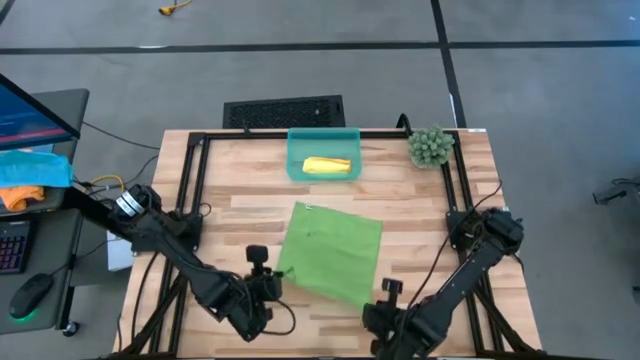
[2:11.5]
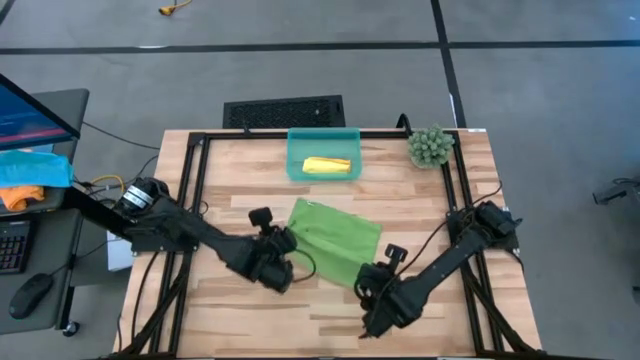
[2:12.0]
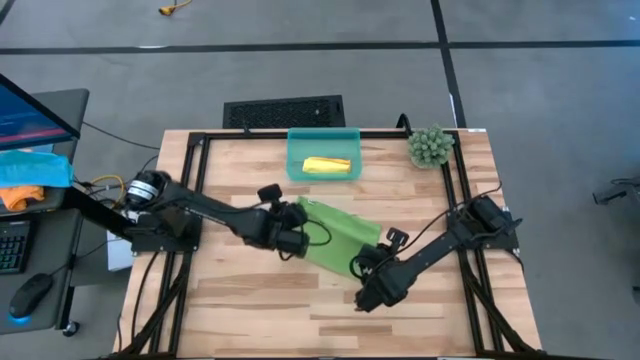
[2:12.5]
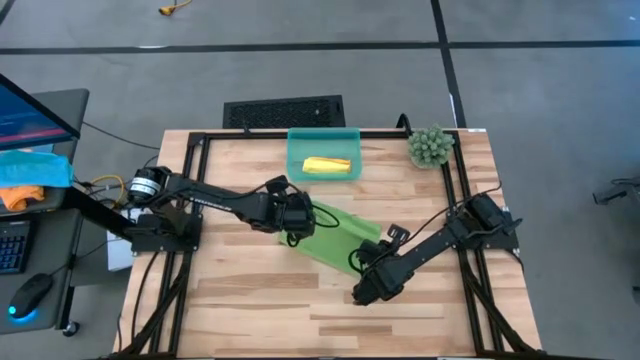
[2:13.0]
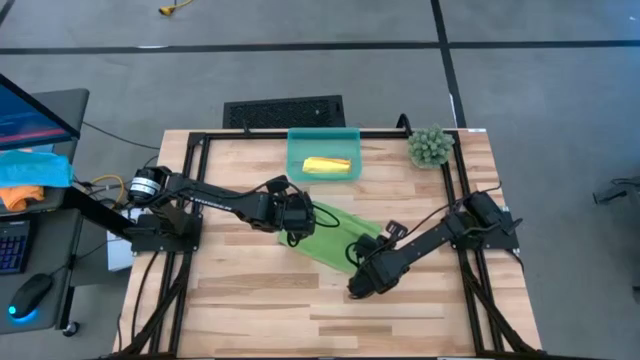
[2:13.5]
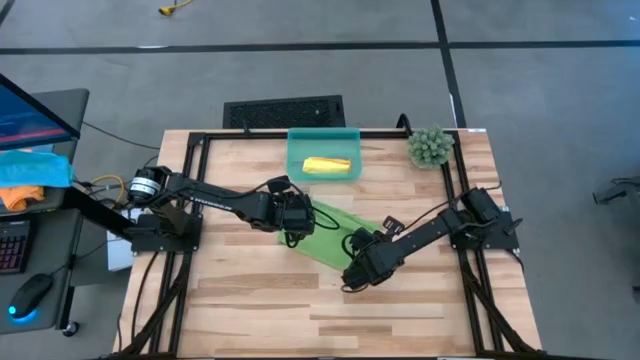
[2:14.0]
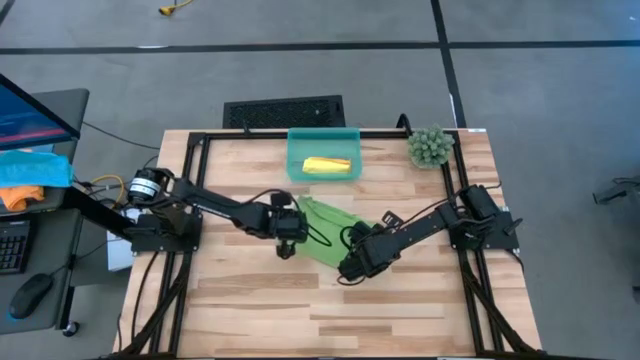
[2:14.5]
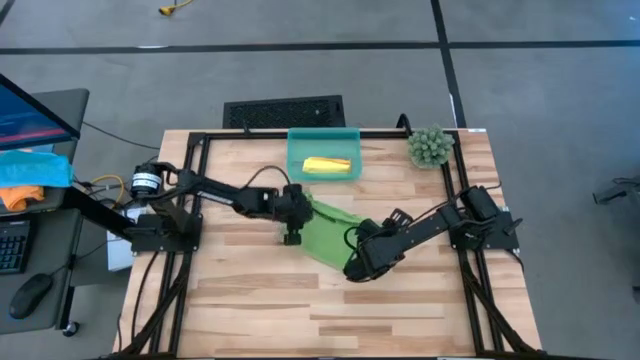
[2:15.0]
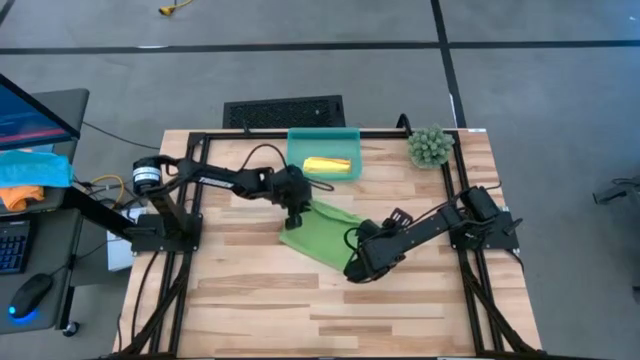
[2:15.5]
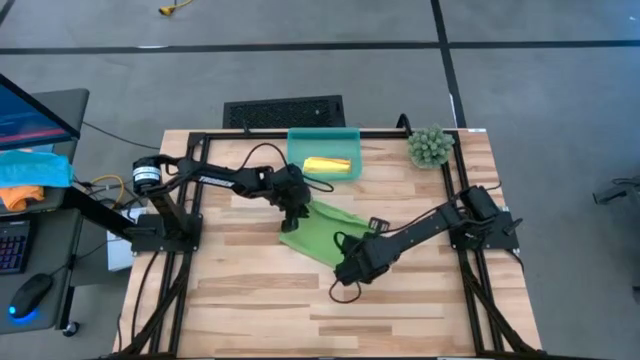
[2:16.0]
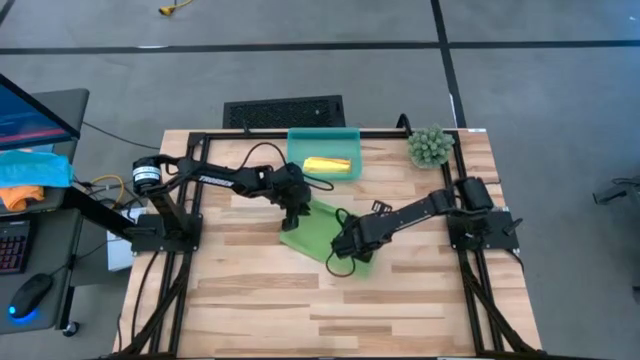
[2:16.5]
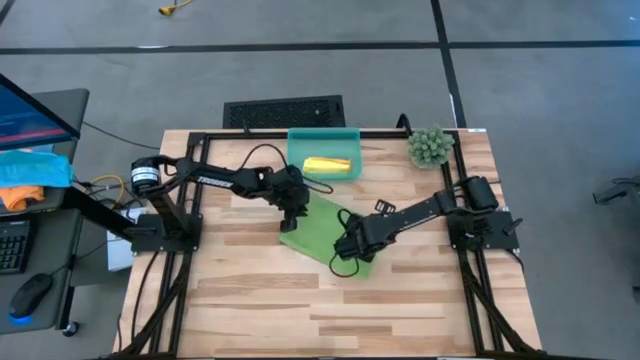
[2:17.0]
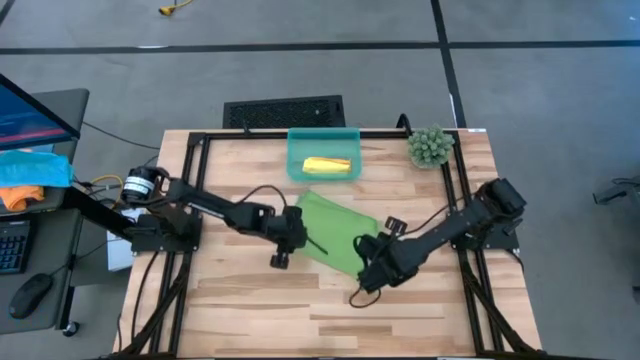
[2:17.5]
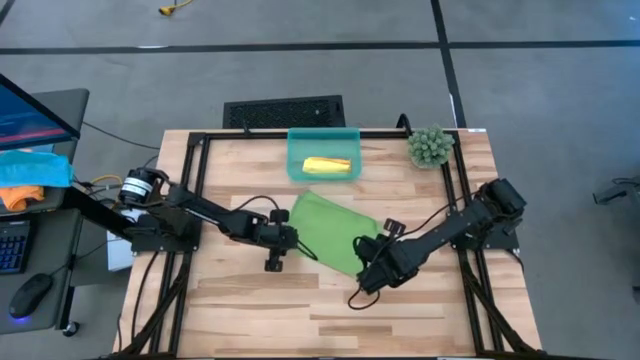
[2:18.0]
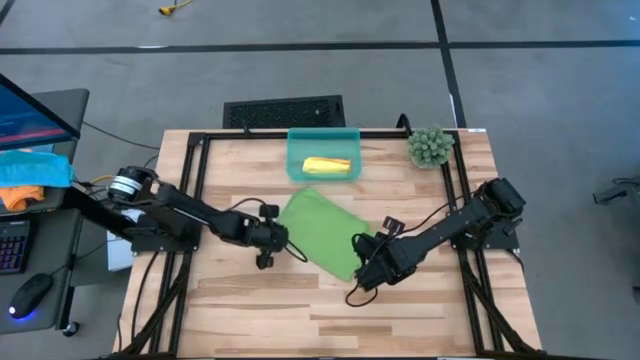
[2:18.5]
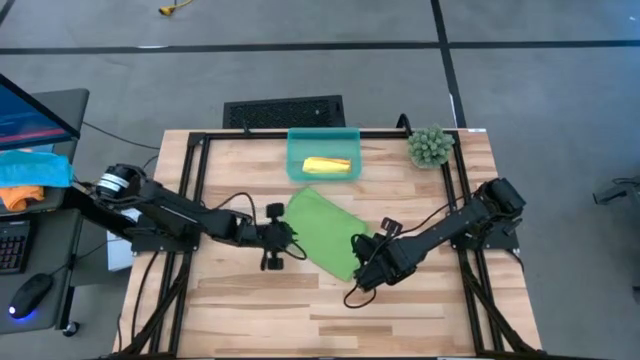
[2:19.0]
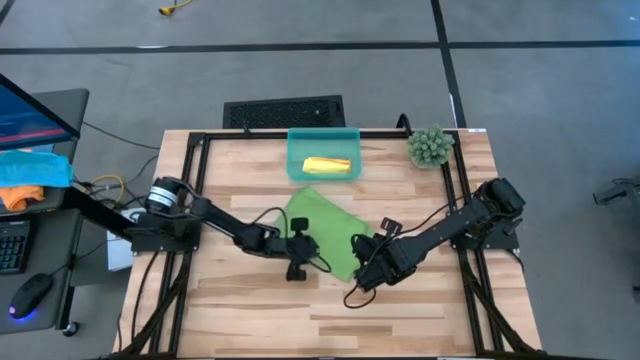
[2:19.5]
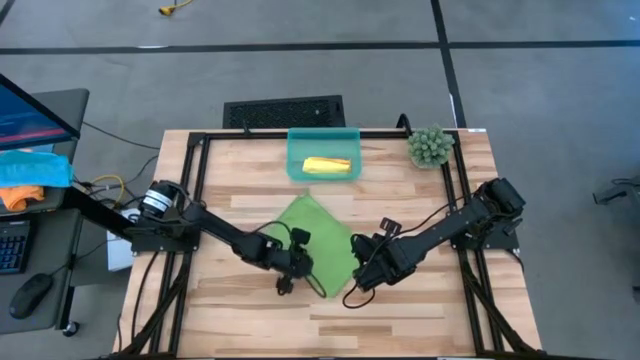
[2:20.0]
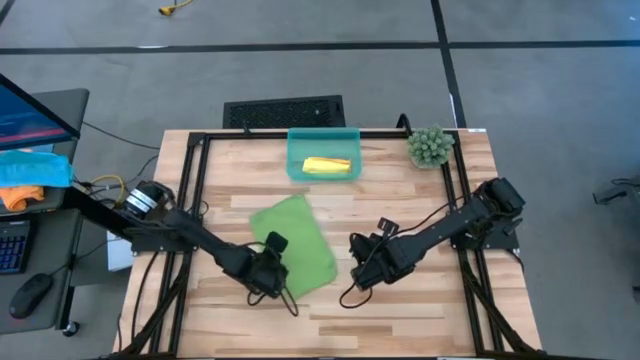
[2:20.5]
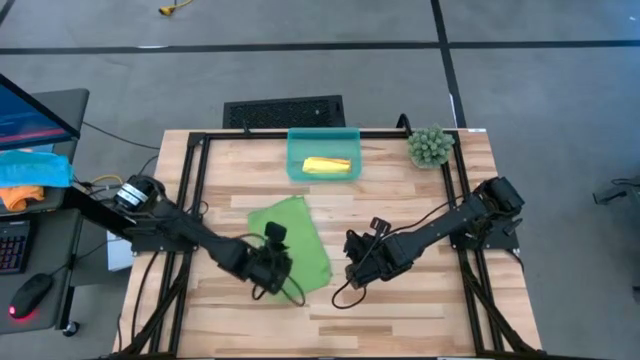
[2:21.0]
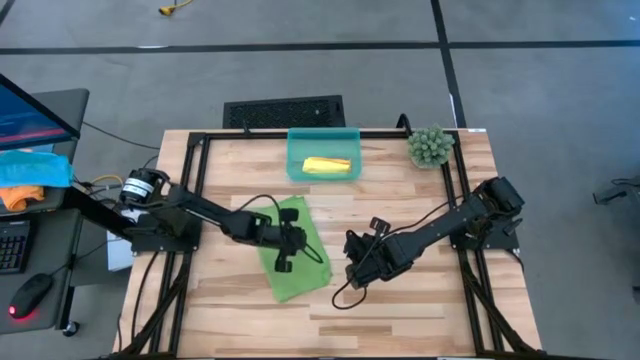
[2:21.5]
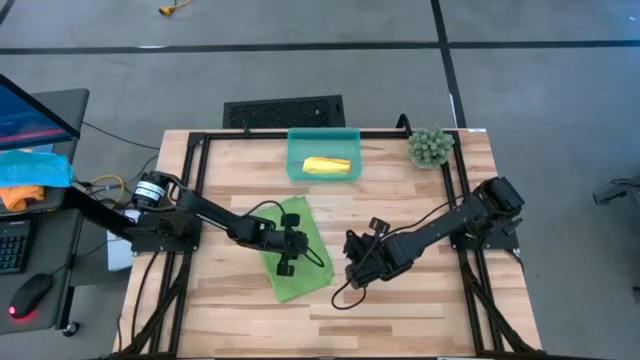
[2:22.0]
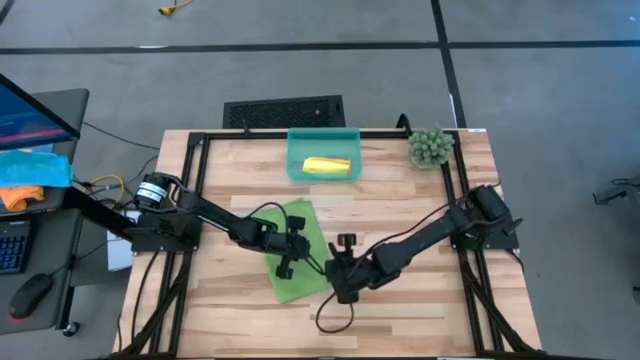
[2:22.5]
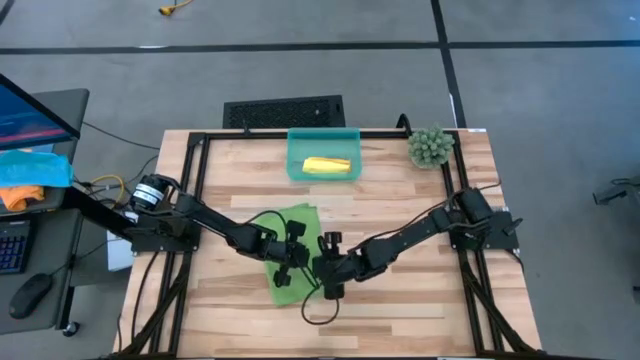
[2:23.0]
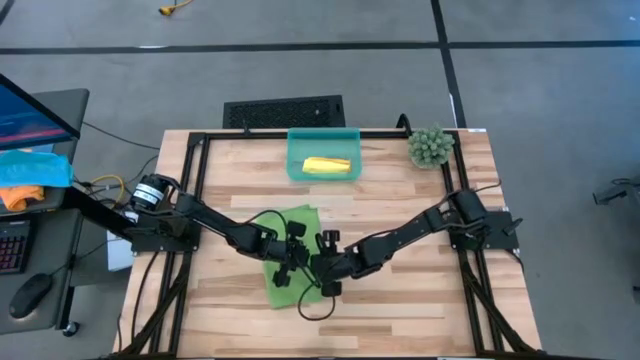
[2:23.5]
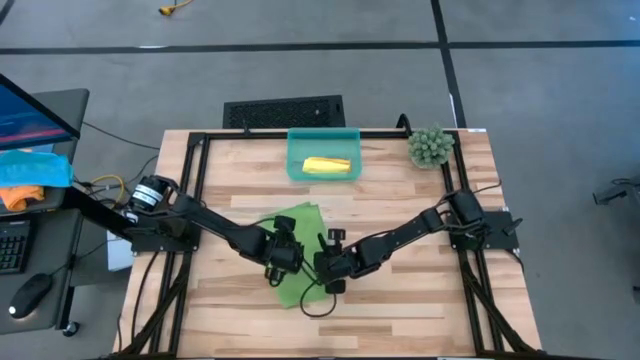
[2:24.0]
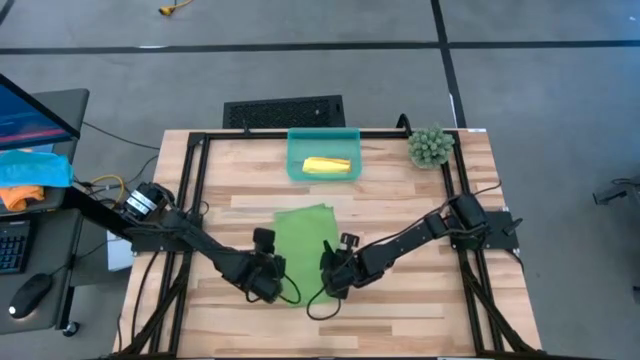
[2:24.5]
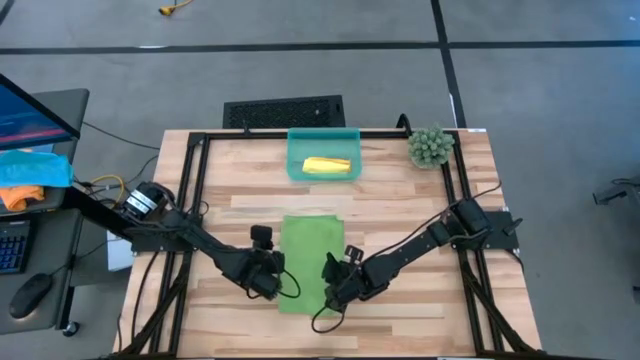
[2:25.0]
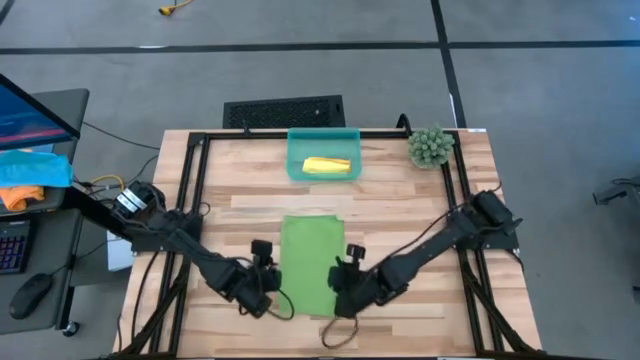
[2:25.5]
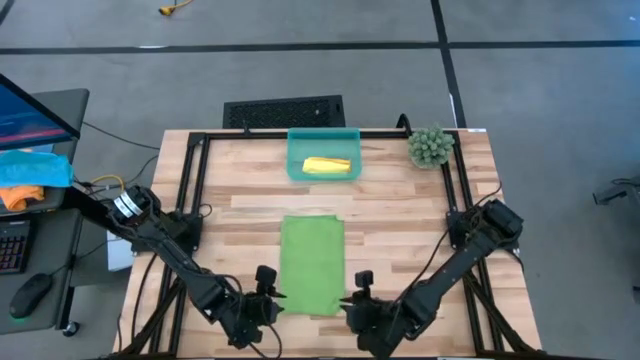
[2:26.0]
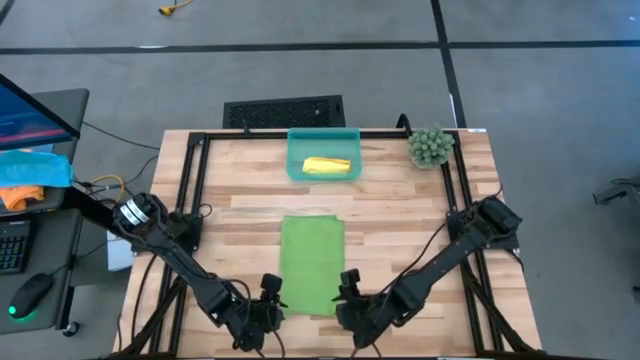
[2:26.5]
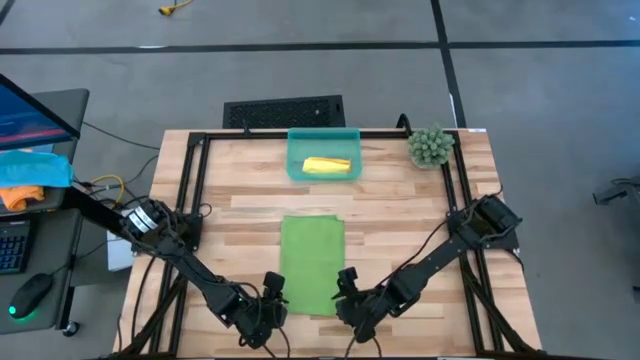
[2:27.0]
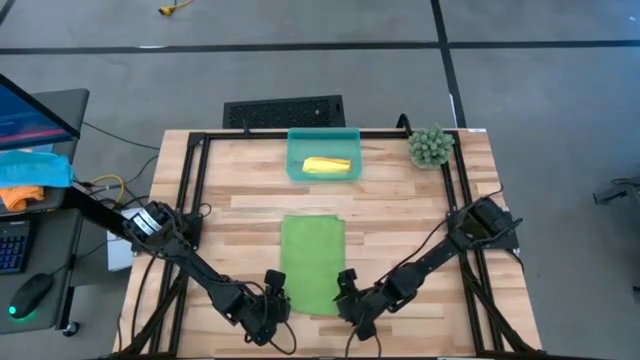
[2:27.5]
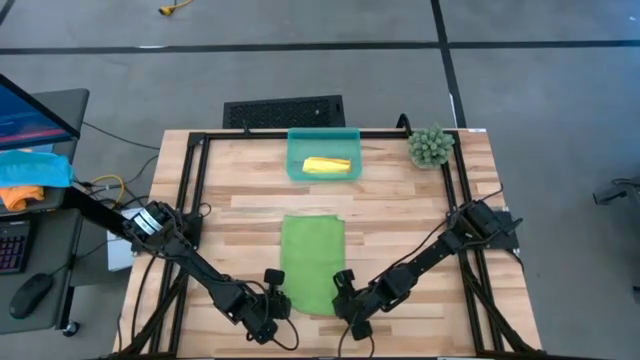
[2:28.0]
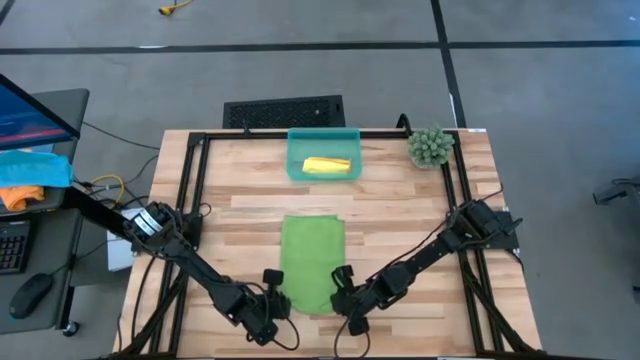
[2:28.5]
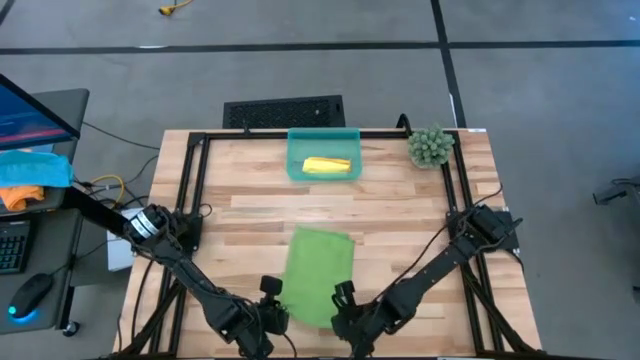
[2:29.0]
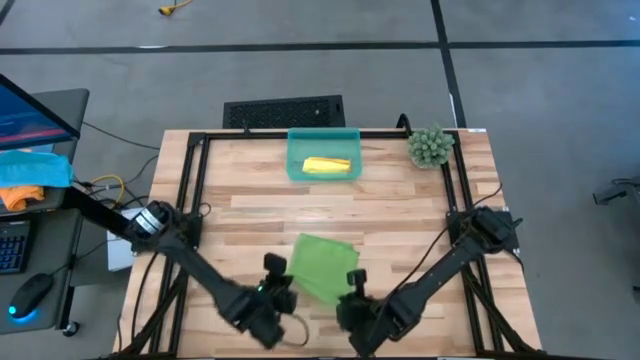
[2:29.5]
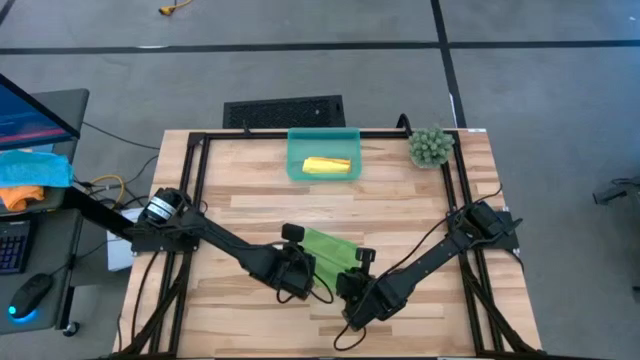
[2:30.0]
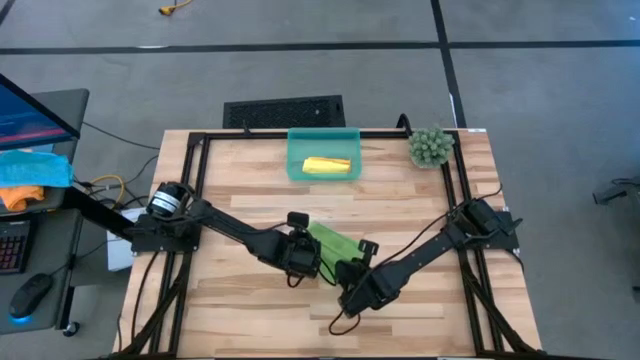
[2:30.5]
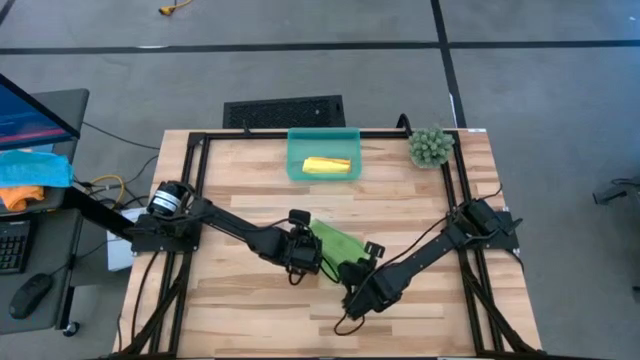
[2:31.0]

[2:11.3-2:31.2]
Task: Roll microfiber towels into tight, uniform cylinder then place into a basket
Fold the green microfiber towel

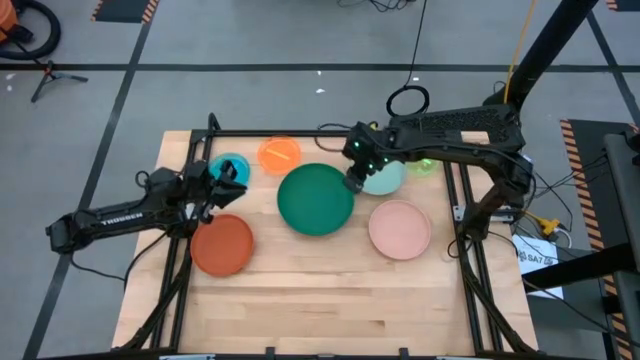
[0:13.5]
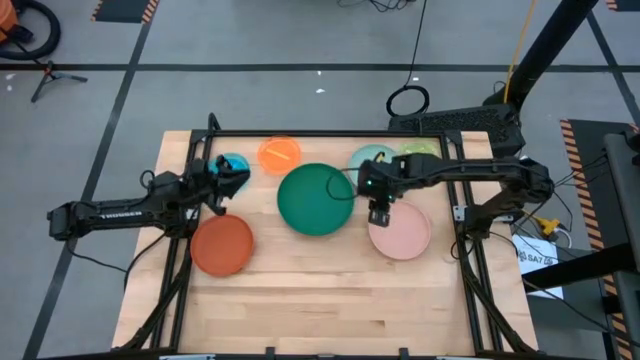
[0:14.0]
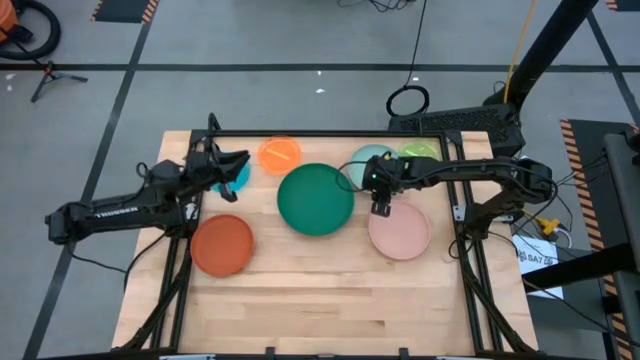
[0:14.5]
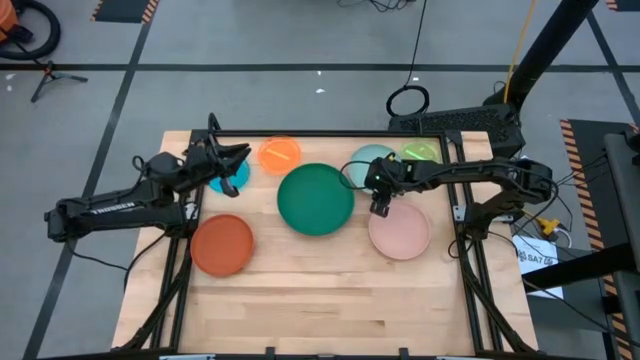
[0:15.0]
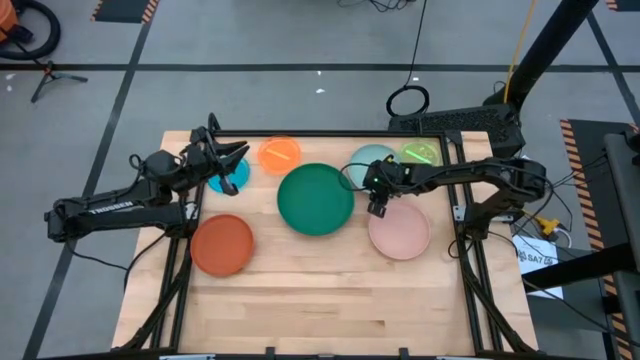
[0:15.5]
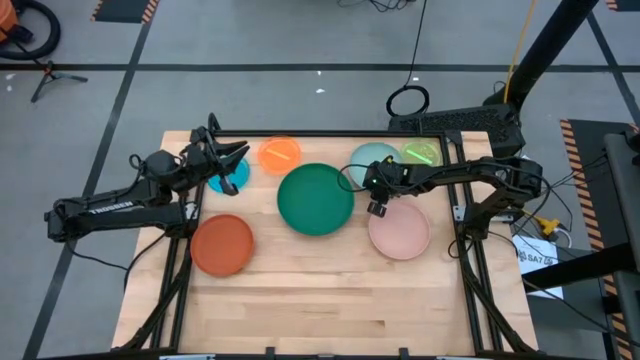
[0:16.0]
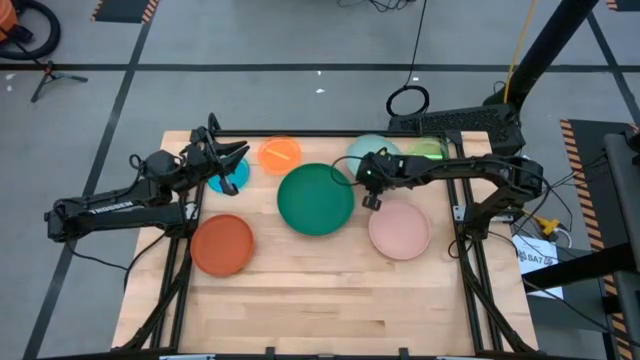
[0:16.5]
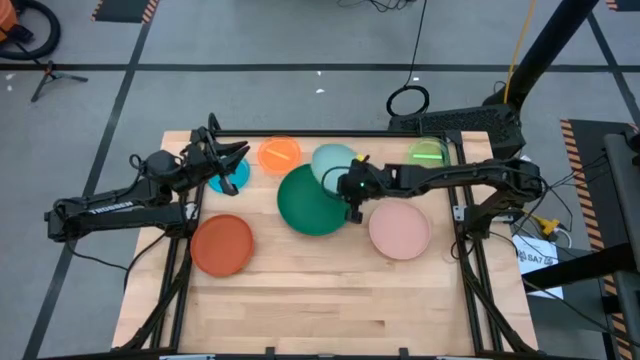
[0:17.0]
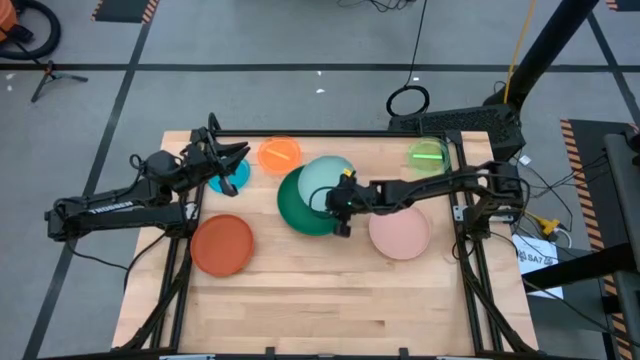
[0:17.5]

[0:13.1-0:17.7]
Task: Stack plastic plates
Stack the light blue plate on top of the dark green plate
